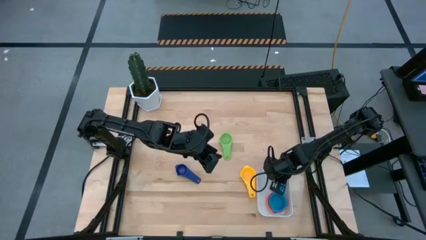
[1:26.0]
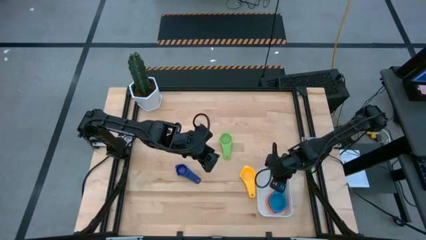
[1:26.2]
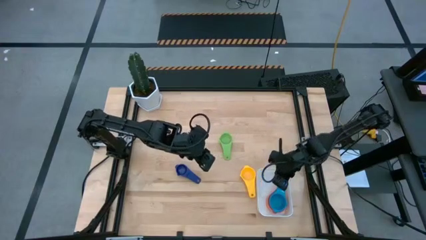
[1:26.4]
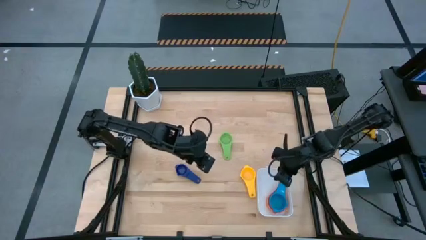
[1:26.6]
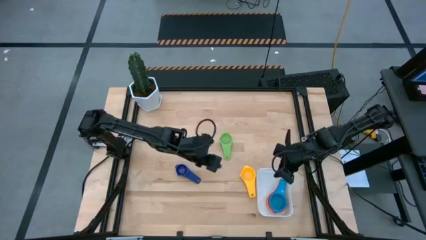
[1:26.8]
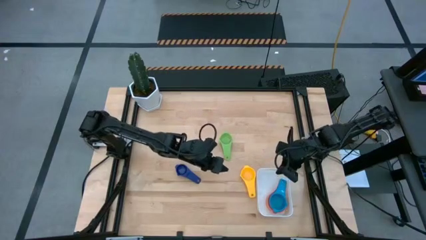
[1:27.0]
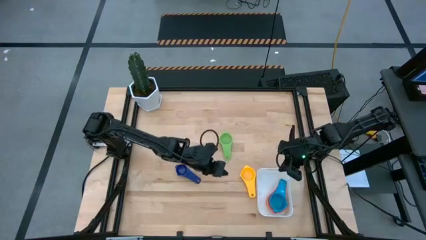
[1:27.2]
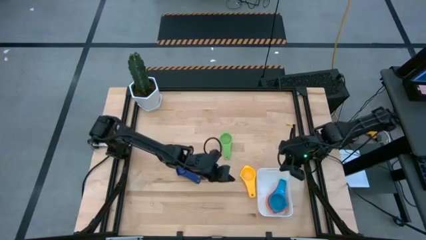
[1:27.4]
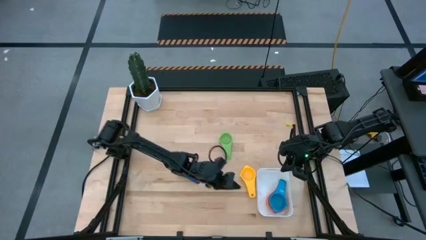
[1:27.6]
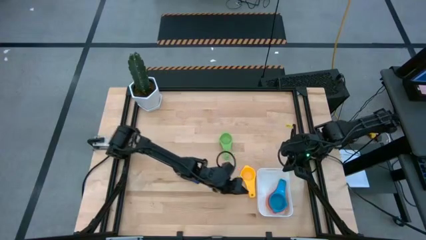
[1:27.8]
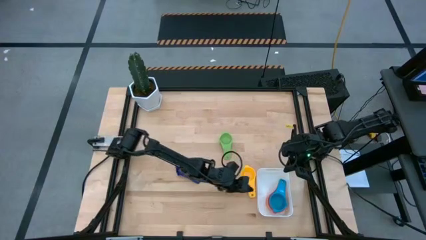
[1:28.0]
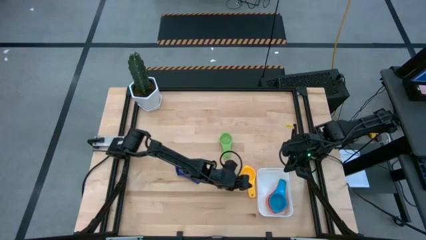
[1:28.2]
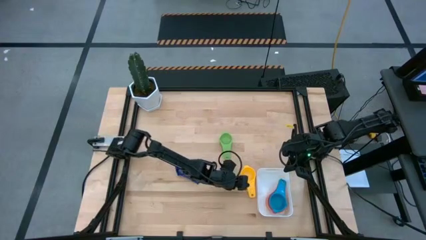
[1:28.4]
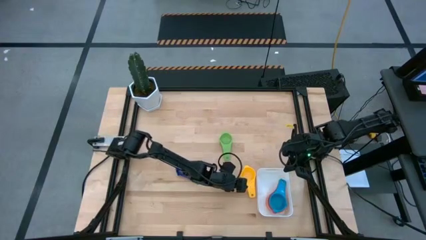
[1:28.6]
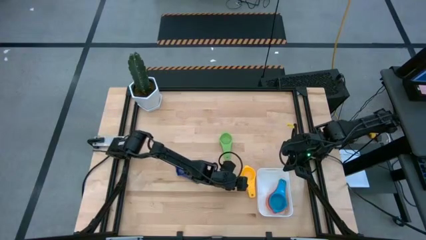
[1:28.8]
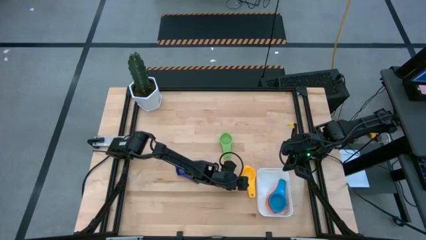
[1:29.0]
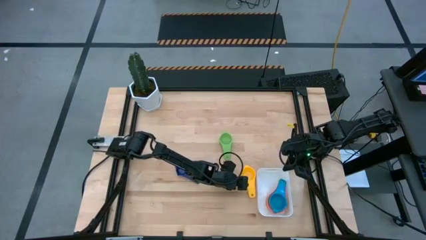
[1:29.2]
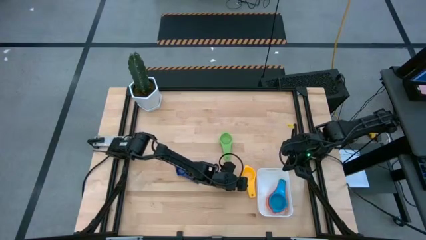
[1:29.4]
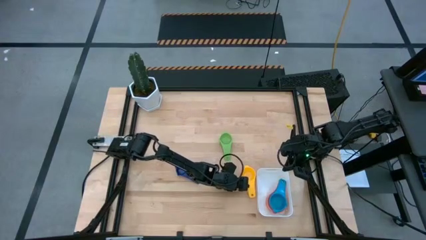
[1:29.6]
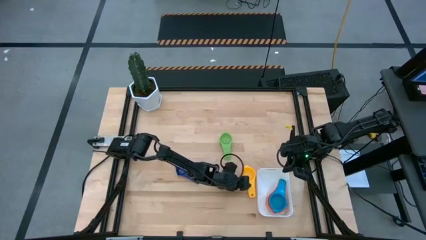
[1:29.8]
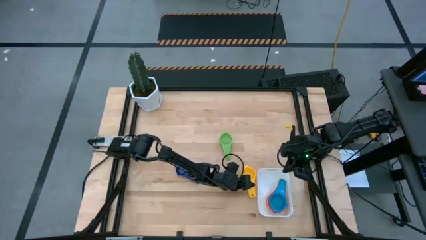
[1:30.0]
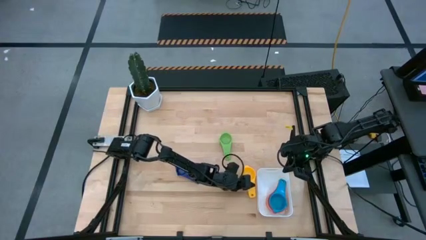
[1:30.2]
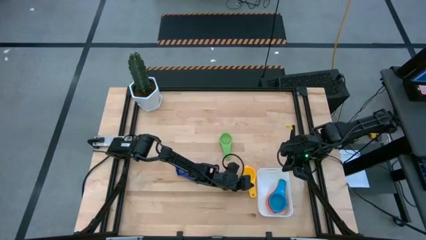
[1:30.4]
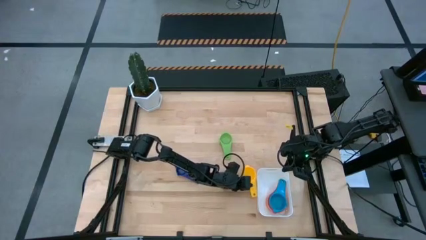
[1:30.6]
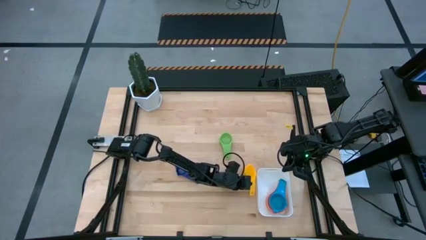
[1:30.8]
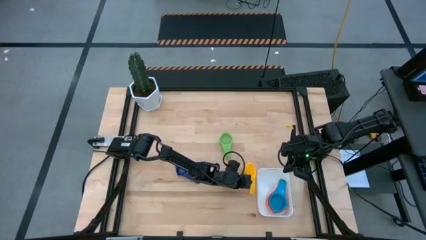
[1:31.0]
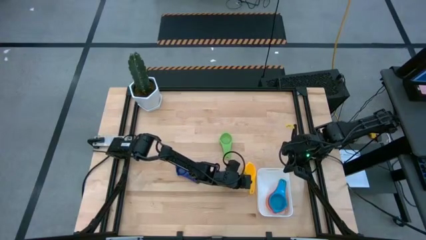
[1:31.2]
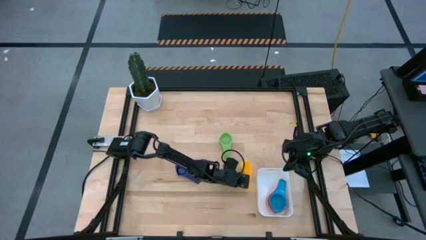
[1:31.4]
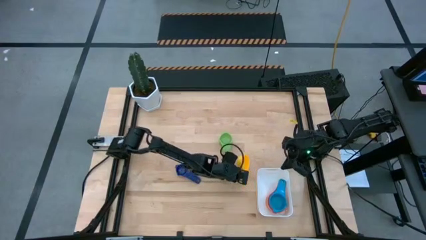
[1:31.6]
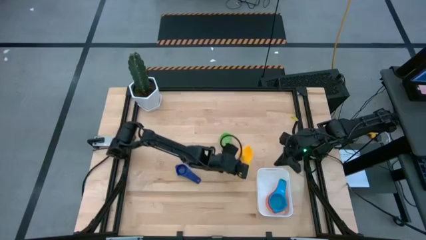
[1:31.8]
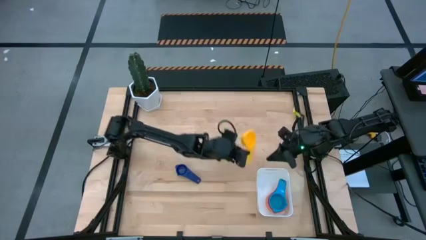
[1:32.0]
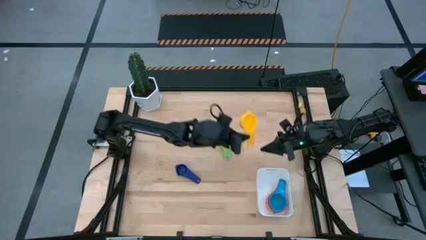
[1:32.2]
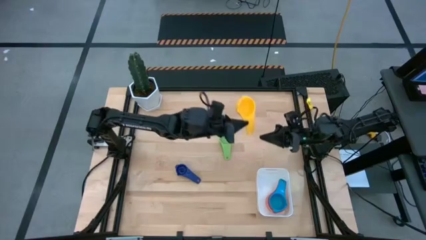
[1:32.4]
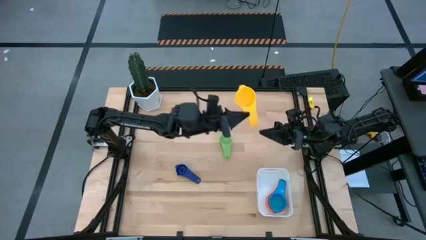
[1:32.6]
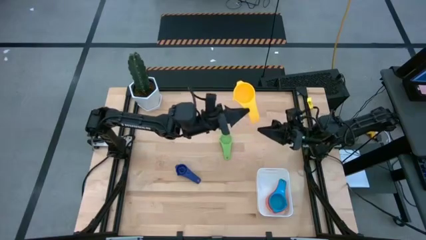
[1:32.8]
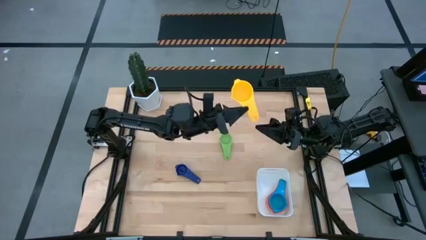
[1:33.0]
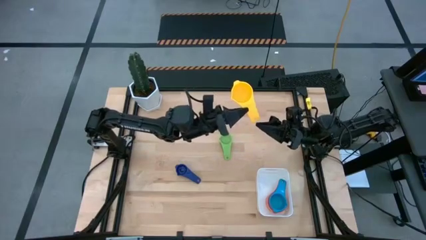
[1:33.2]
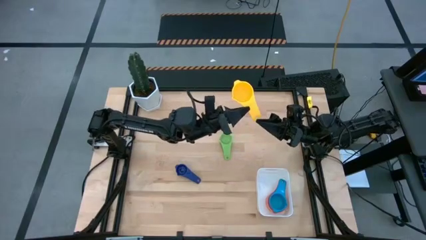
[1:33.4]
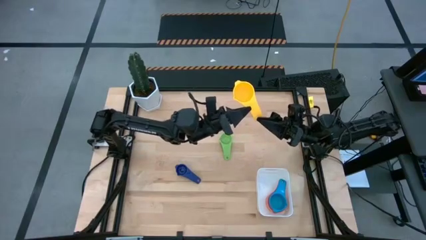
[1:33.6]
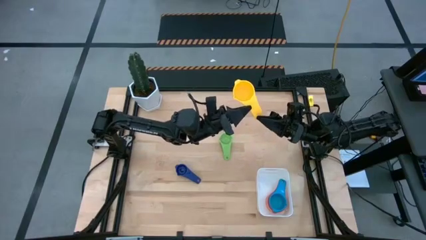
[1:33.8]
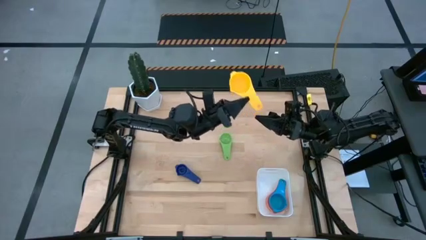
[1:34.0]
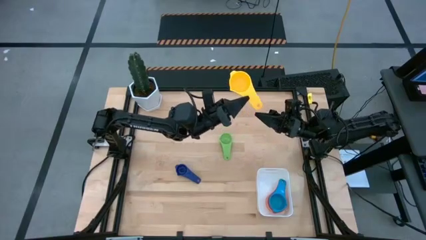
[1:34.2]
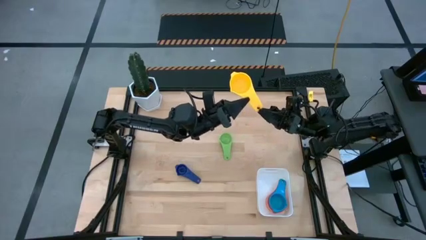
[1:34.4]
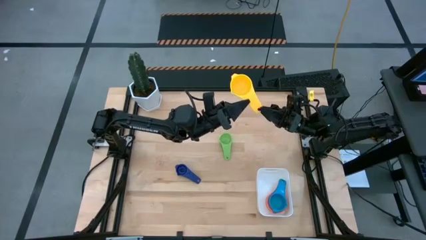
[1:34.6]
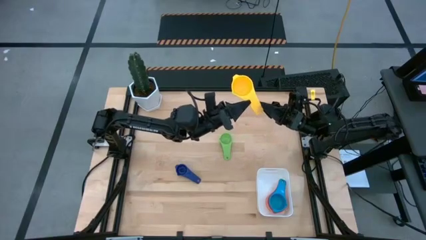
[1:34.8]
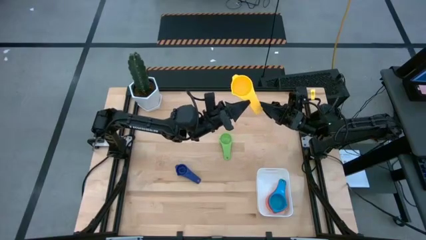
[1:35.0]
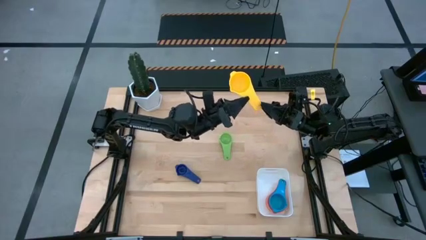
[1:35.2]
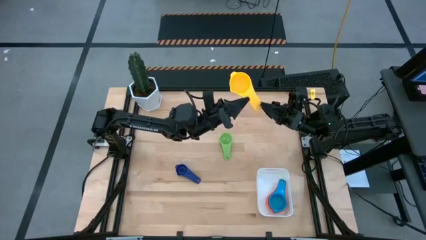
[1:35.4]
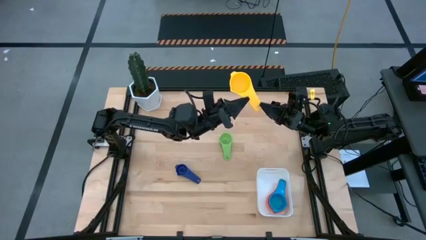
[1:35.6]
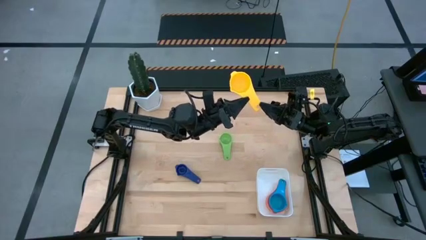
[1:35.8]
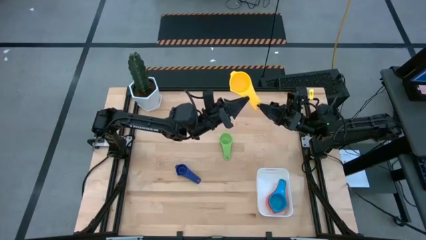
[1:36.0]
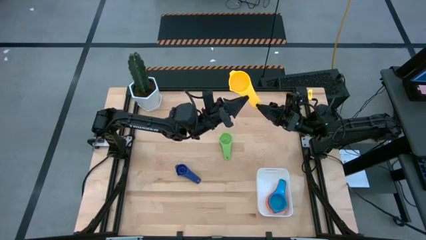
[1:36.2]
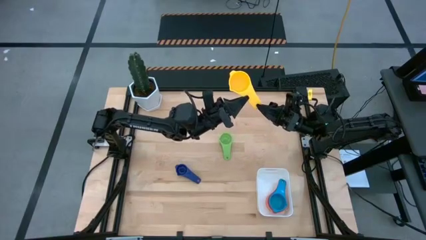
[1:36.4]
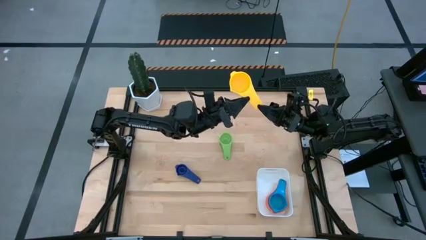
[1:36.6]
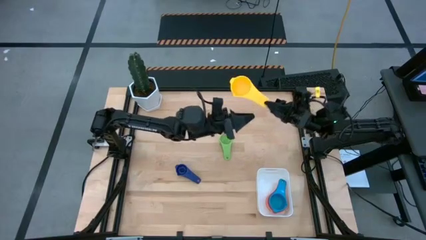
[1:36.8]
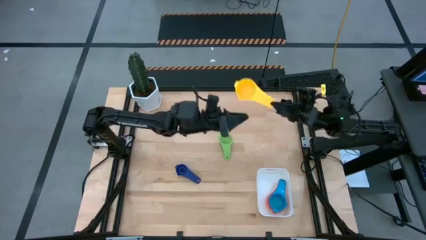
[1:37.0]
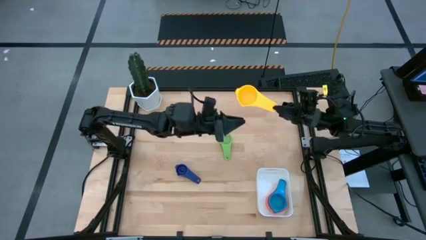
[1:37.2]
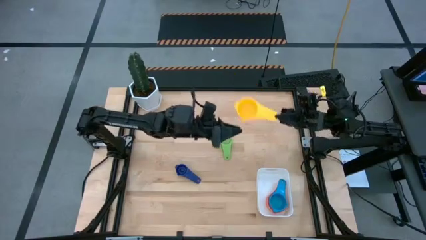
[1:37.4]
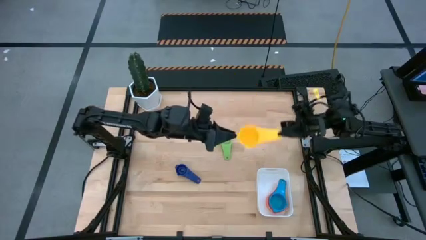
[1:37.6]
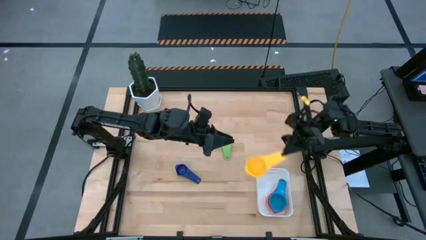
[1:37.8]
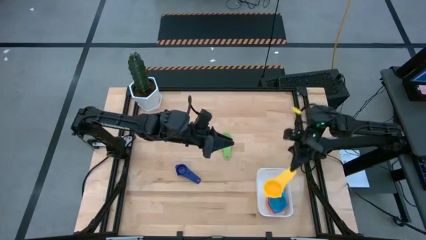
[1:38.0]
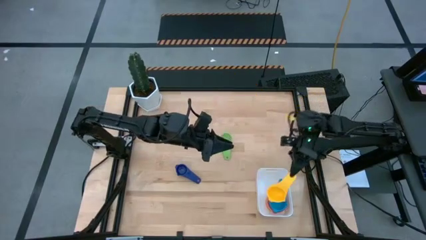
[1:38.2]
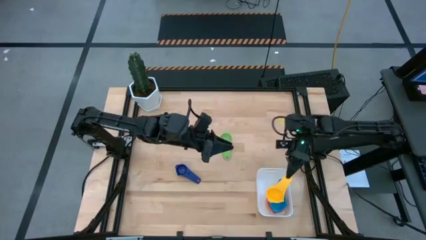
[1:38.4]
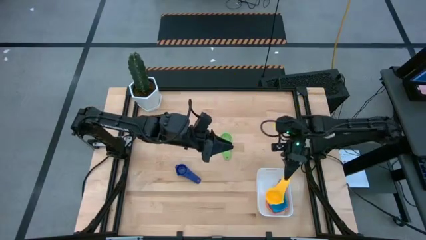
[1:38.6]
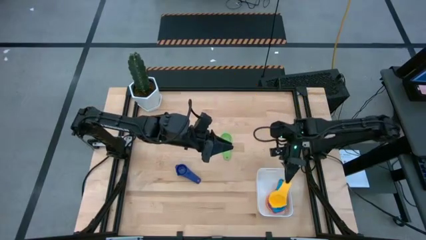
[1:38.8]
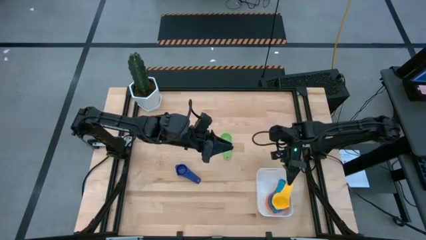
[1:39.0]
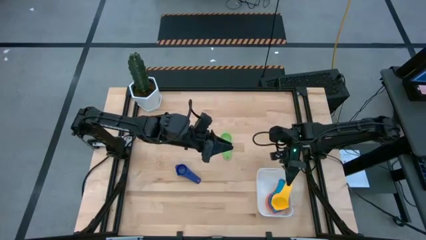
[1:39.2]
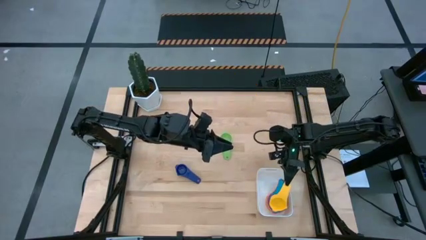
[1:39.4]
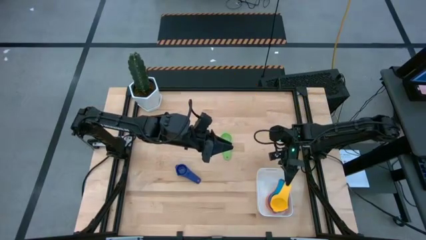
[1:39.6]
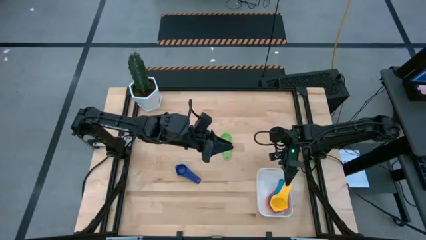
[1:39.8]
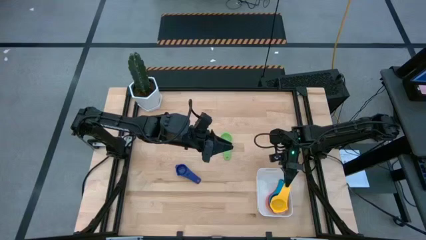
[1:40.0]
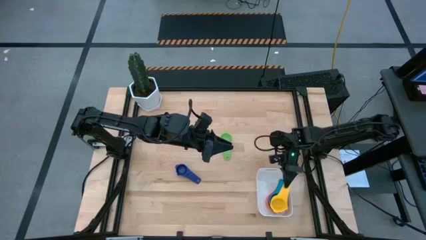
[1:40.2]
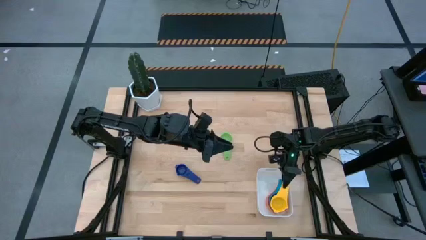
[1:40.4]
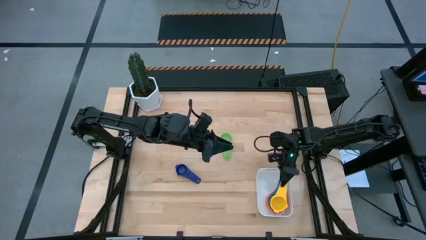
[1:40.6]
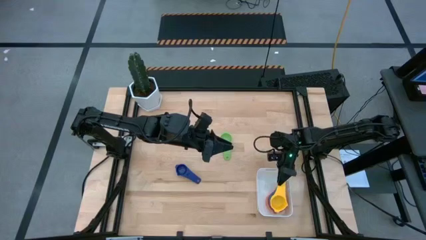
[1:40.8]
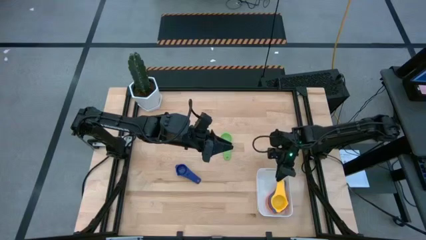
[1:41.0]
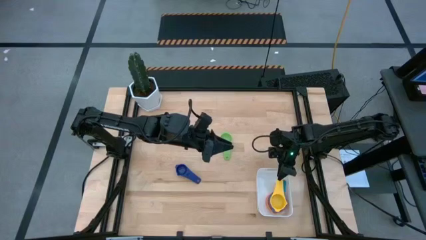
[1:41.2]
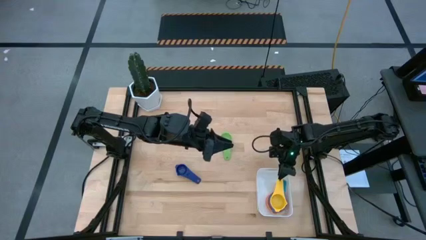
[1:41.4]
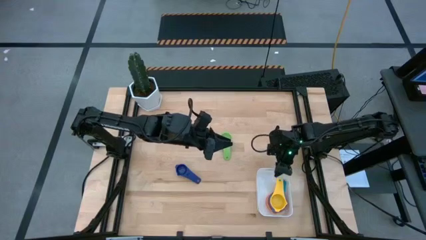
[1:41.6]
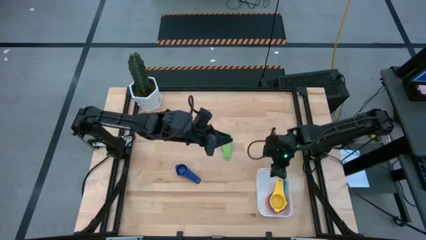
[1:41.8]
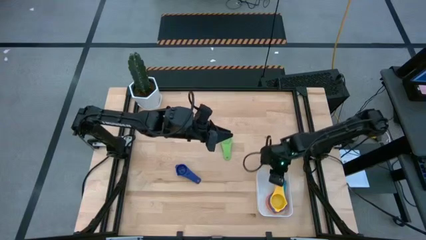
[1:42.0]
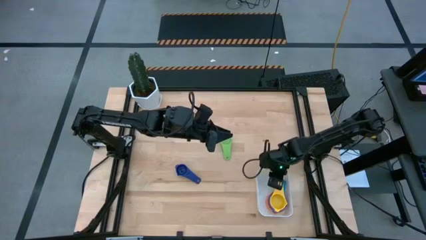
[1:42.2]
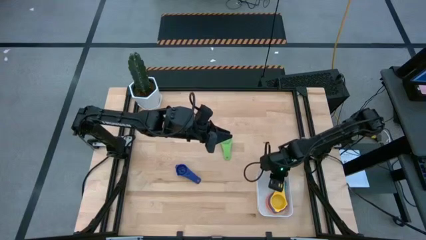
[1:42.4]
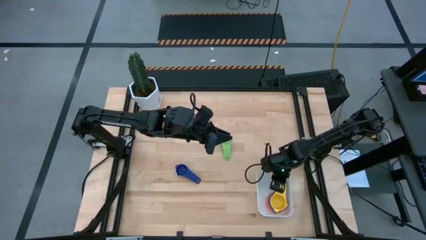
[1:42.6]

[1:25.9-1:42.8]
Task: Nest measuring cups in basket
Stack the yellow measuring cup on top of the light blue measuring cup into the white bin
